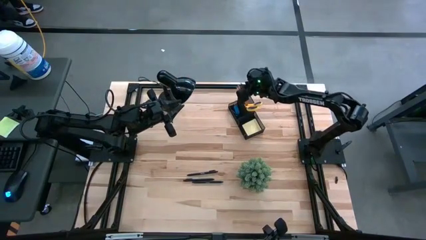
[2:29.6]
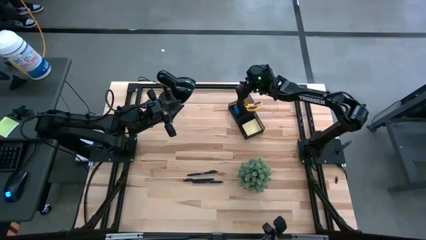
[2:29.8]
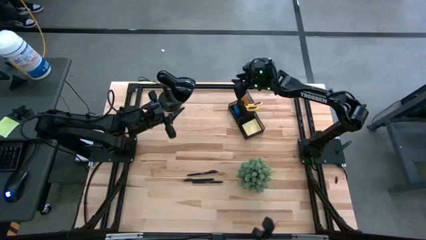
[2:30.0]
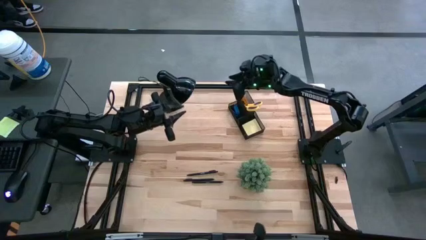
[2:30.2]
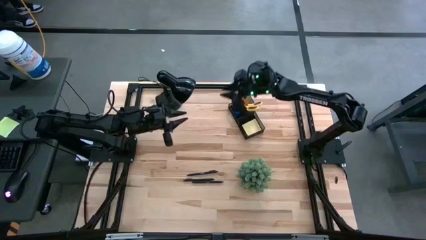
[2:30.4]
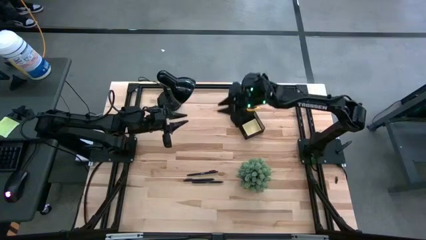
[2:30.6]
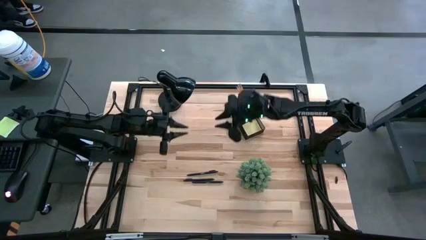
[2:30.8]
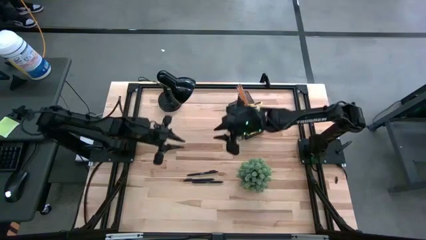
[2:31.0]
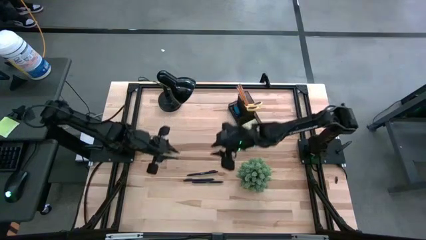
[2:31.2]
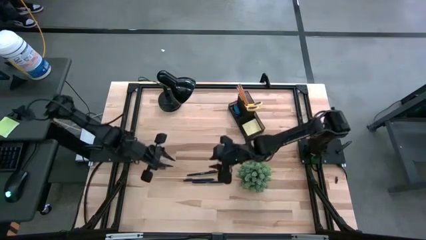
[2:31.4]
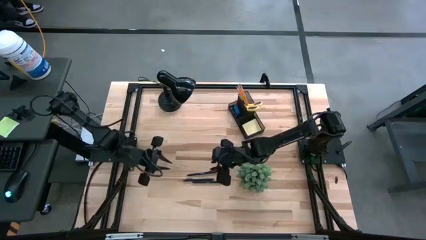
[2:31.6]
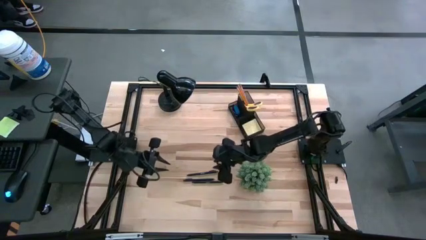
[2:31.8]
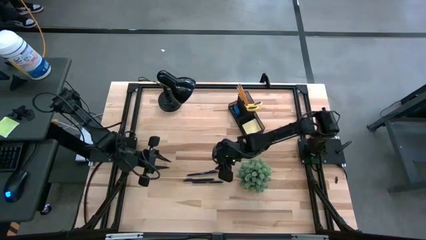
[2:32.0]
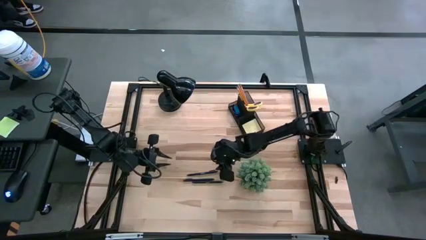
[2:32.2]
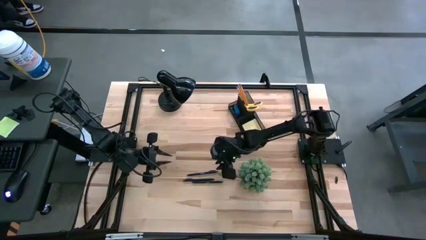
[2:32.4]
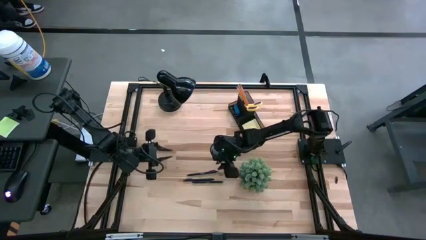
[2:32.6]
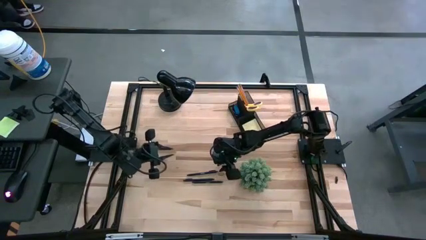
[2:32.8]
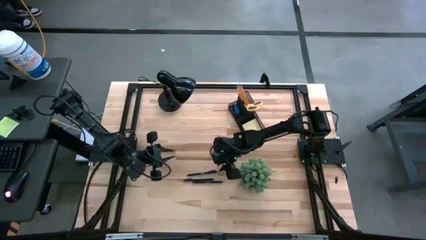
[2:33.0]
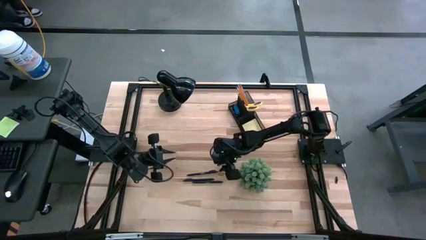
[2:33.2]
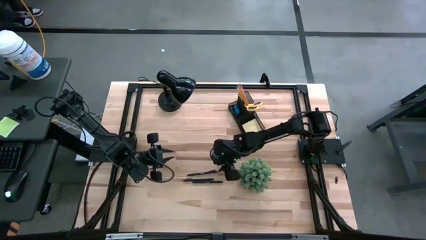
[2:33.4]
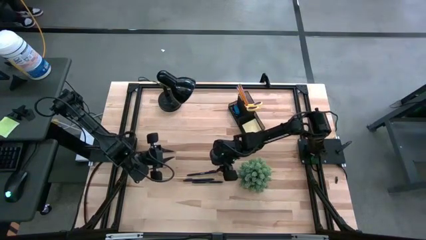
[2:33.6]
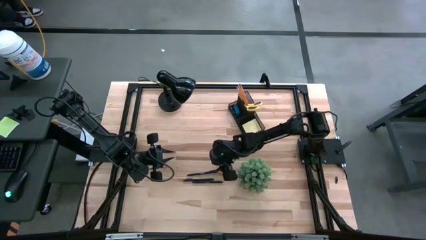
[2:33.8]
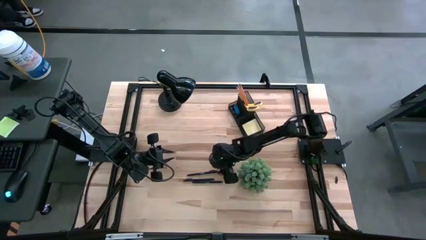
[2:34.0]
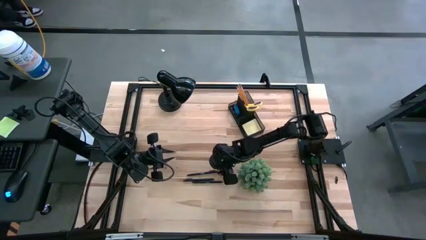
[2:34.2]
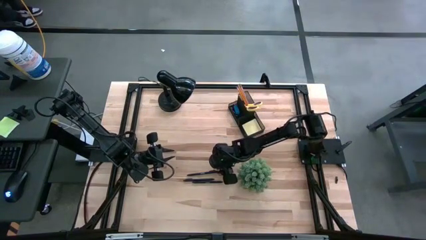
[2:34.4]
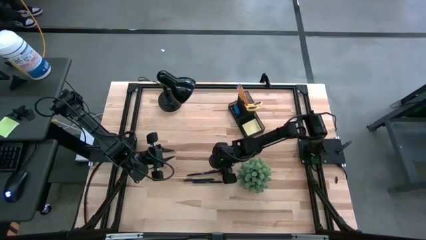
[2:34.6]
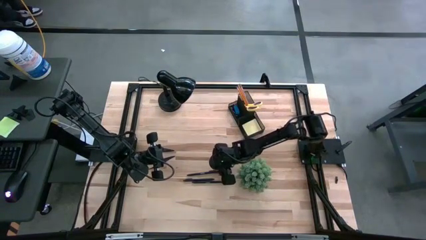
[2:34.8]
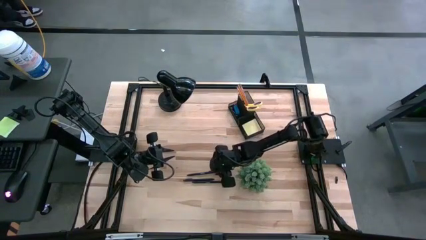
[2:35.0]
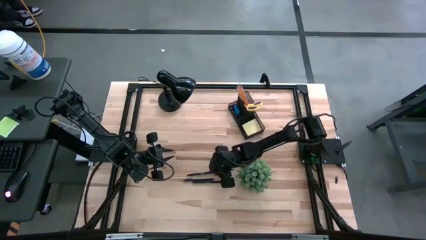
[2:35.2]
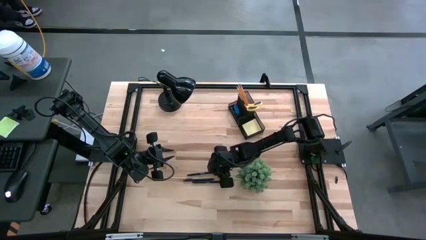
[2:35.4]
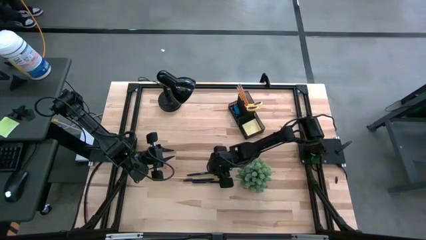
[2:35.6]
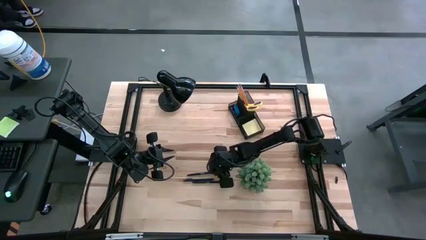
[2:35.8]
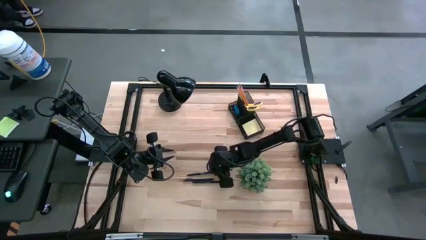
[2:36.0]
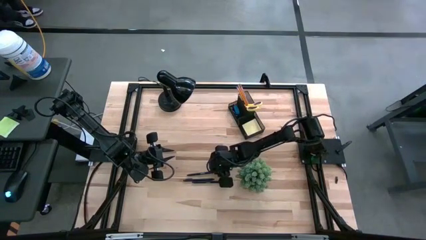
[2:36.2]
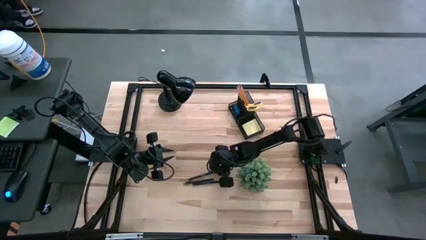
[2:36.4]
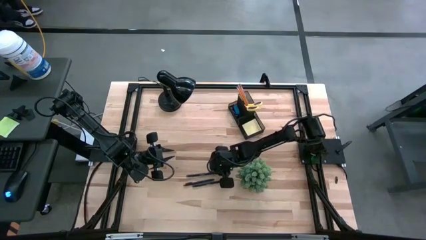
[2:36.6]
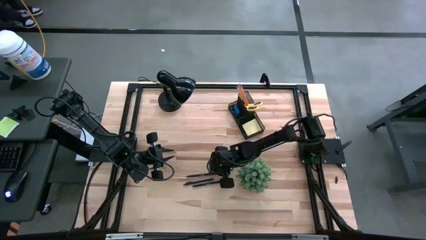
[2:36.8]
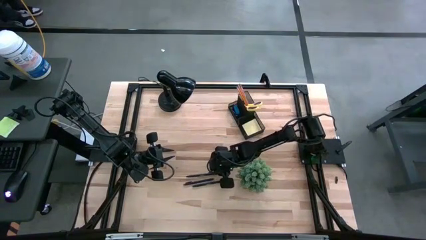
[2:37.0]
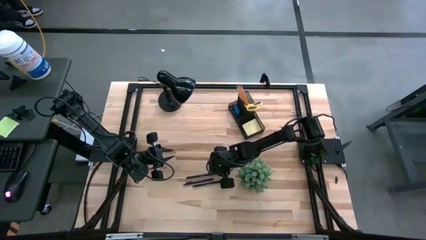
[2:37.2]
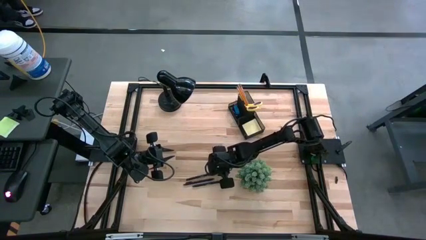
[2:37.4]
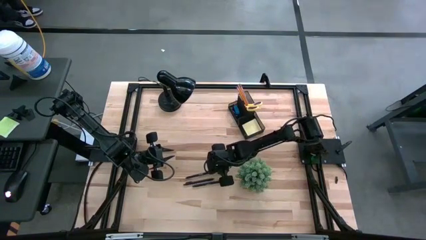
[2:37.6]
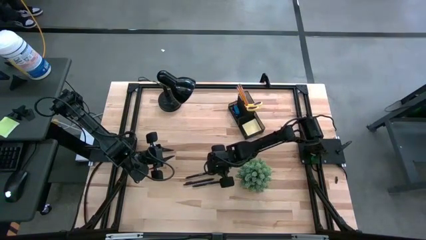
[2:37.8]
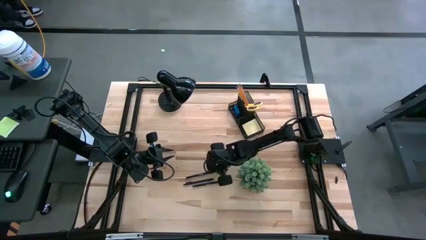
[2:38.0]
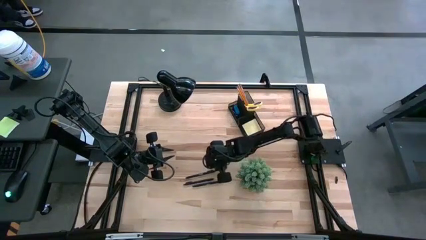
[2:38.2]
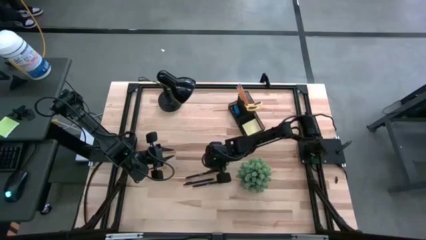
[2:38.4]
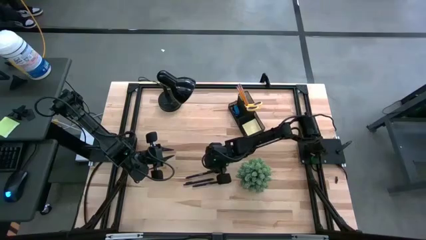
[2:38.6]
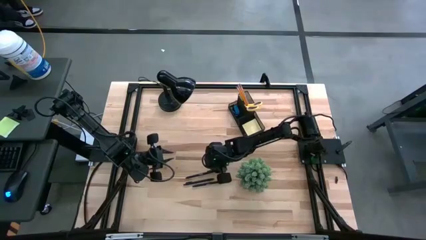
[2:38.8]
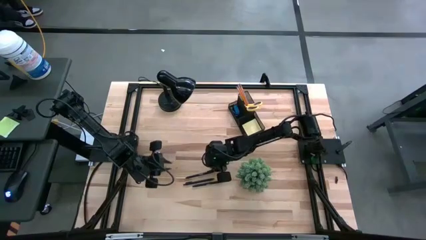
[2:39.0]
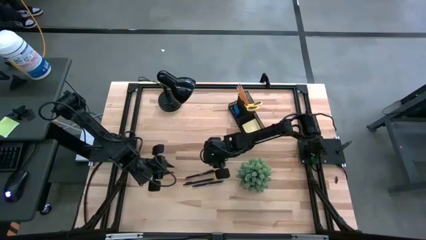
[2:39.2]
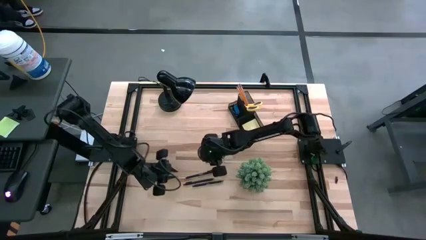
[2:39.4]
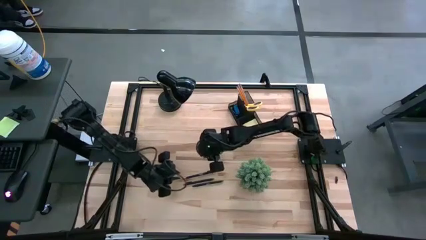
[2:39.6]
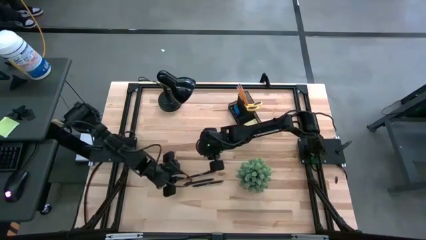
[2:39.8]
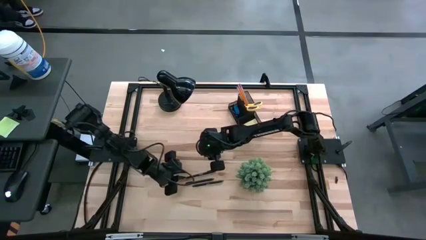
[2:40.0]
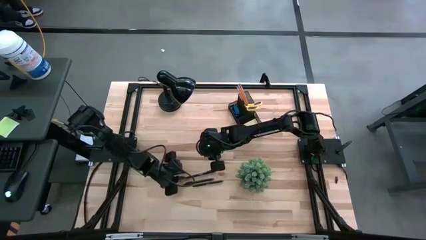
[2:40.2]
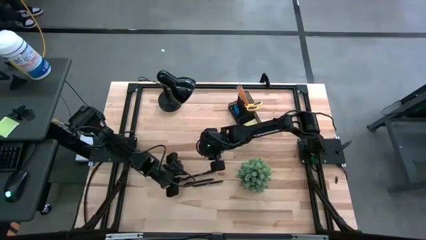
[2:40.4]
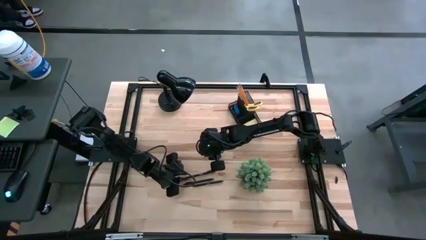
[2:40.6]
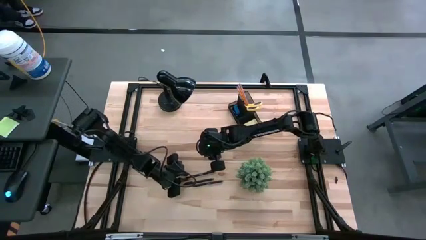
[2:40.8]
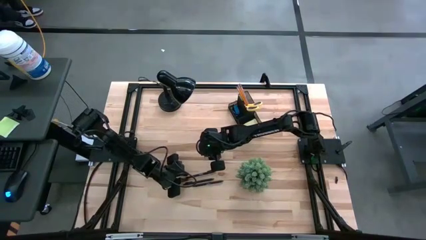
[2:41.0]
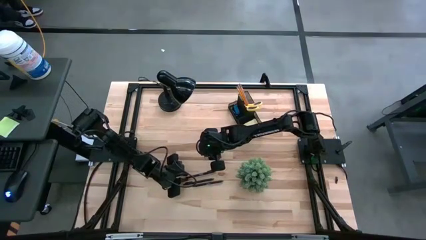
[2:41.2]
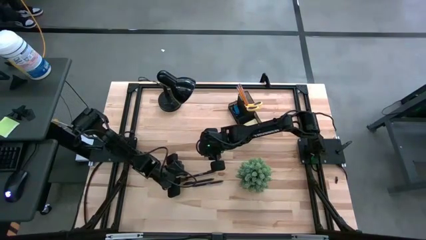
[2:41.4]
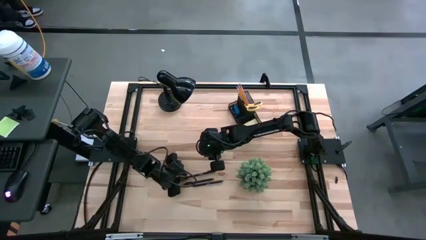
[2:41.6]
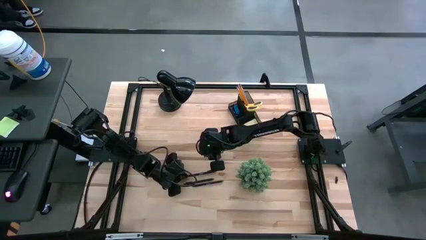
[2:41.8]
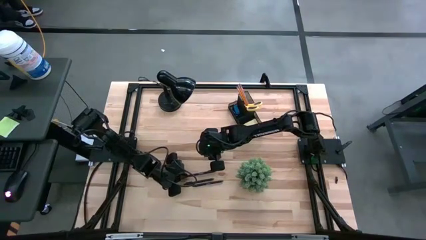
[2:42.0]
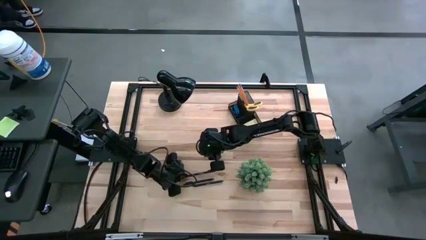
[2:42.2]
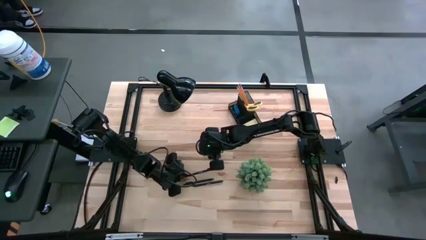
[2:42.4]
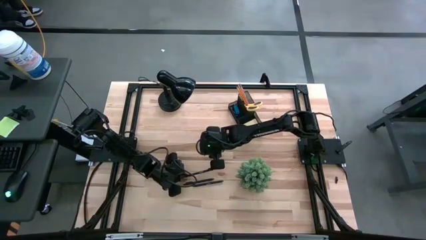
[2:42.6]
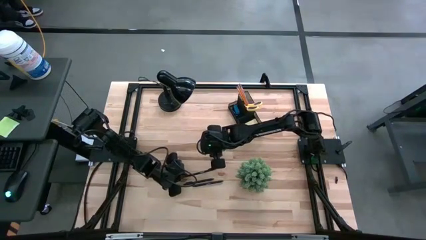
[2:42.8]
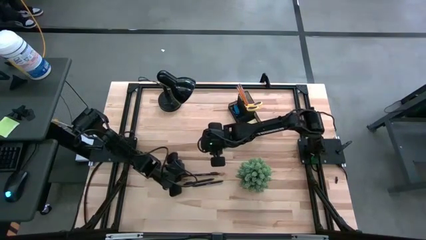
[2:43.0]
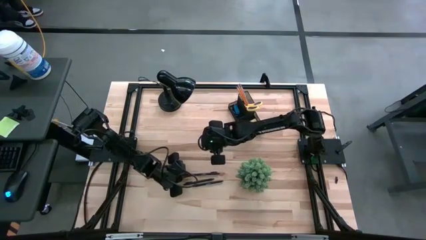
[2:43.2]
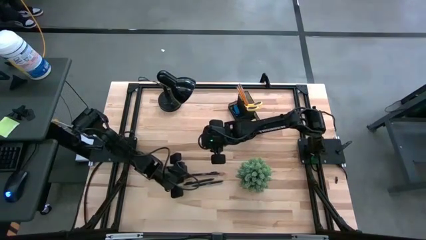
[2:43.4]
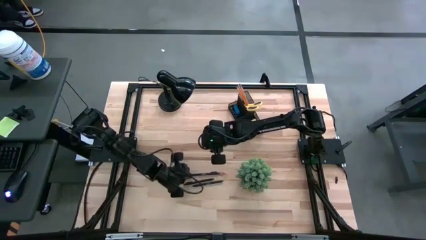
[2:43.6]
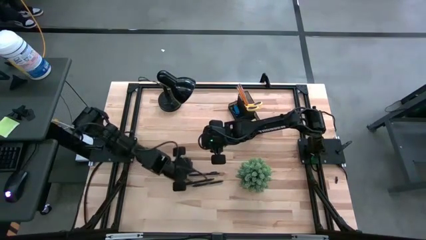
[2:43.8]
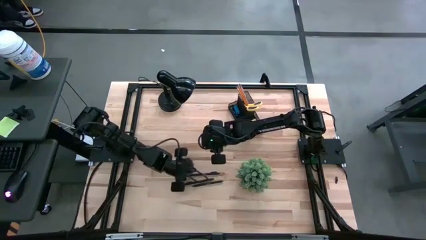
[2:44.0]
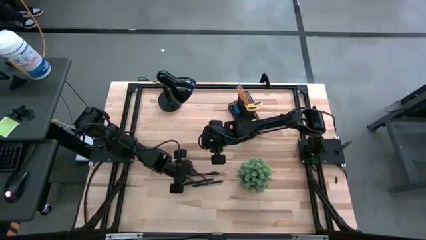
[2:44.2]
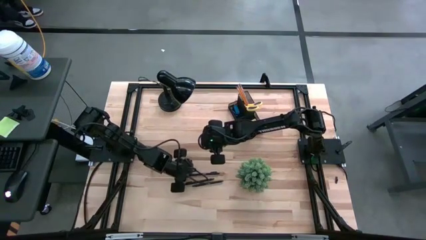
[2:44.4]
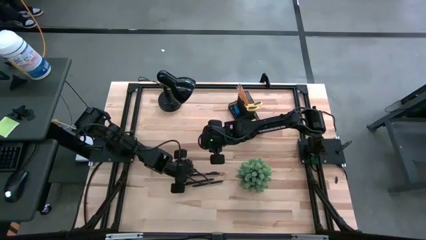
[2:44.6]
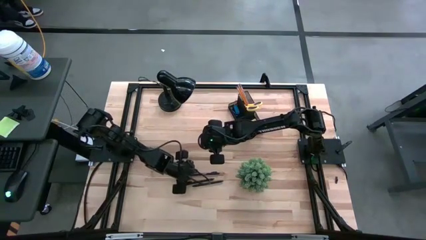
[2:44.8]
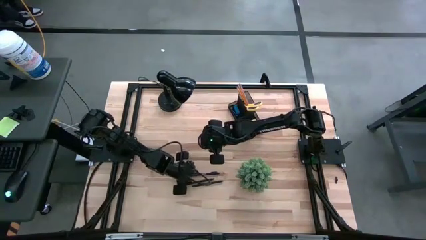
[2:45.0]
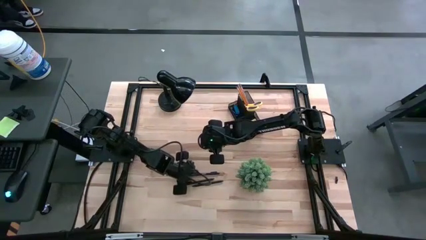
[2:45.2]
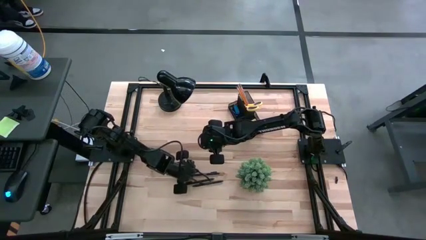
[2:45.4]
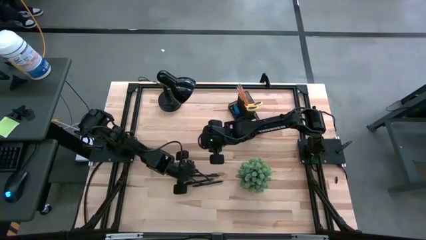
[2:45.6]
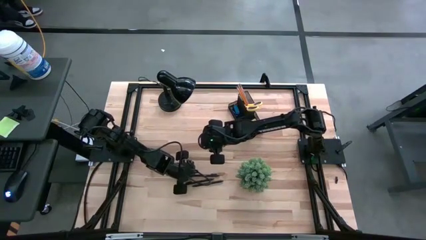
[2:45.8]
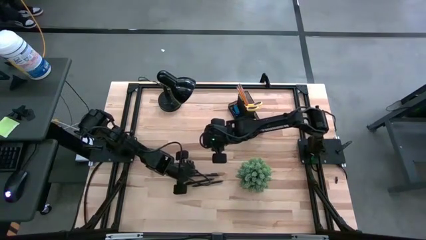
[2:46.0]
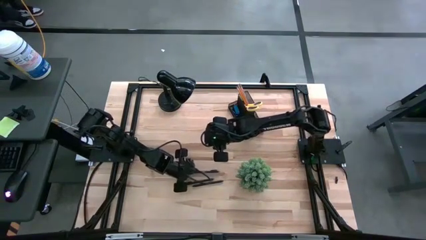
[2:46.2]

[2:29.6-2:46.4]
Task: Pick and place office supplies into organizer
Put the top black pen into the desk organizer
